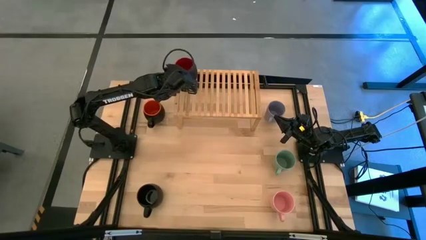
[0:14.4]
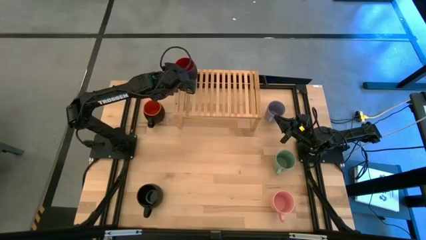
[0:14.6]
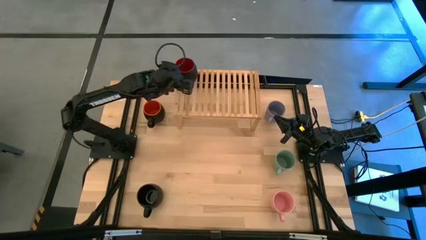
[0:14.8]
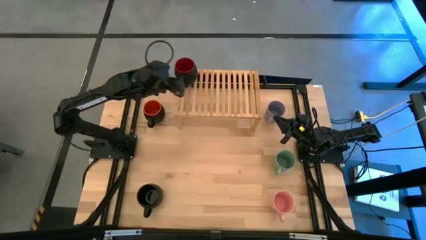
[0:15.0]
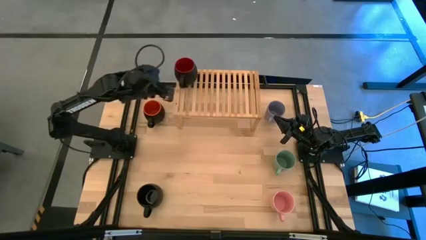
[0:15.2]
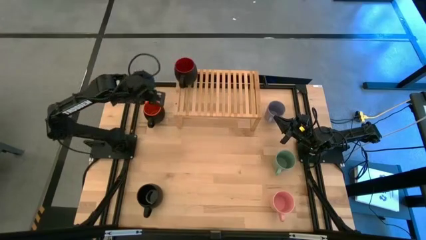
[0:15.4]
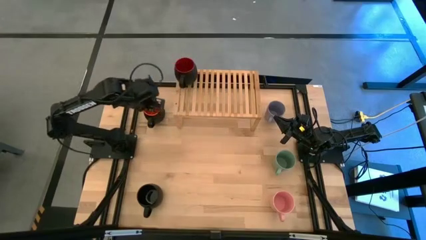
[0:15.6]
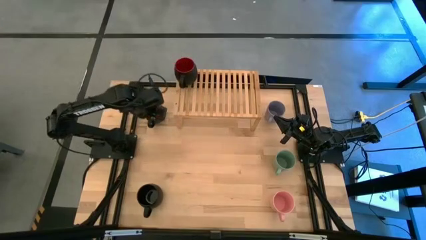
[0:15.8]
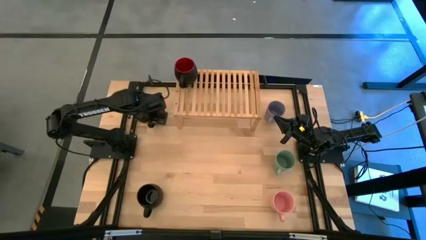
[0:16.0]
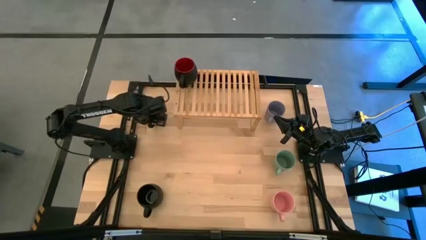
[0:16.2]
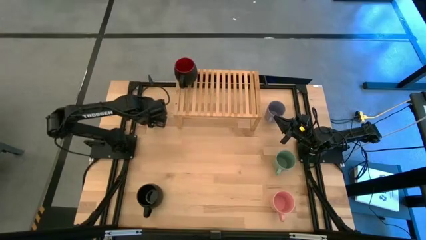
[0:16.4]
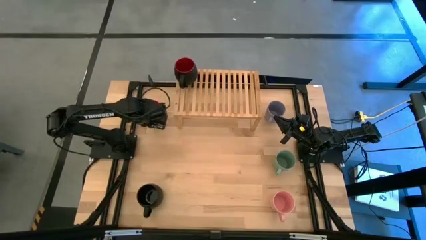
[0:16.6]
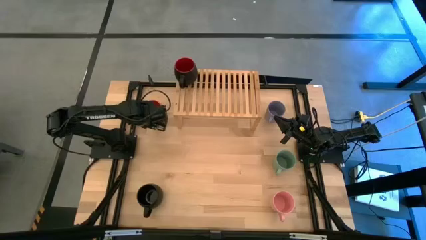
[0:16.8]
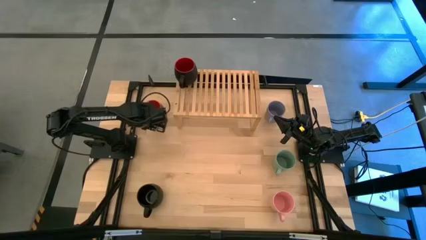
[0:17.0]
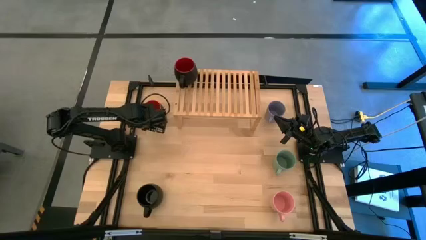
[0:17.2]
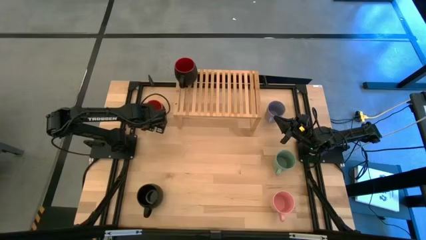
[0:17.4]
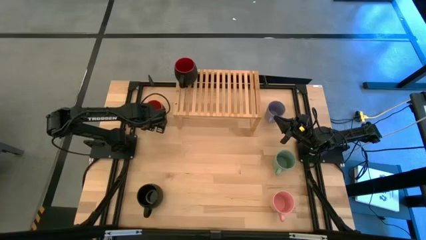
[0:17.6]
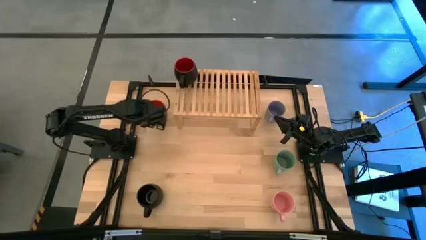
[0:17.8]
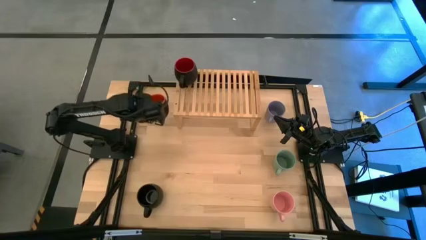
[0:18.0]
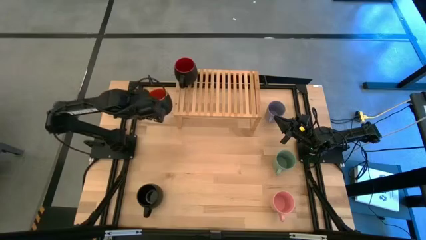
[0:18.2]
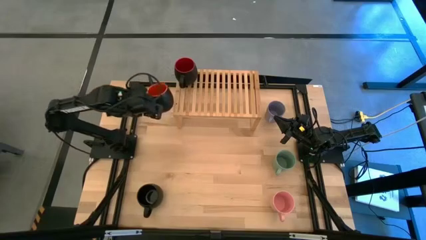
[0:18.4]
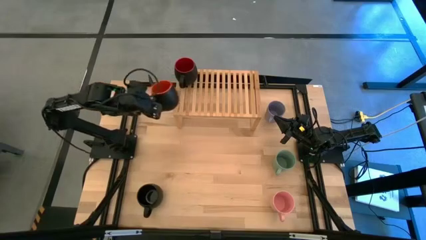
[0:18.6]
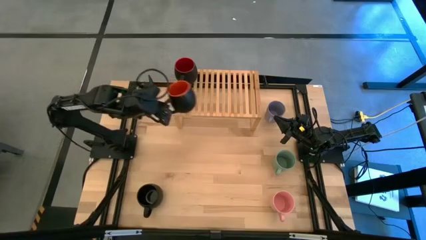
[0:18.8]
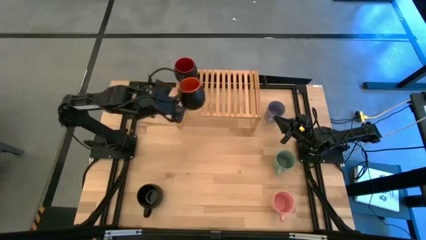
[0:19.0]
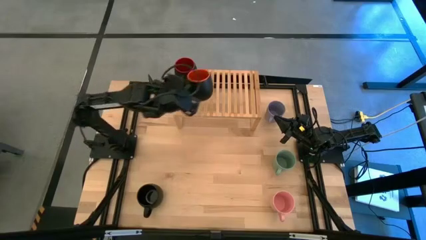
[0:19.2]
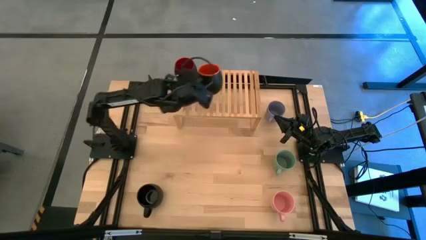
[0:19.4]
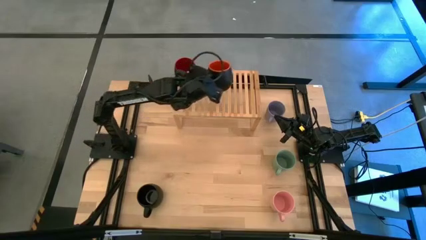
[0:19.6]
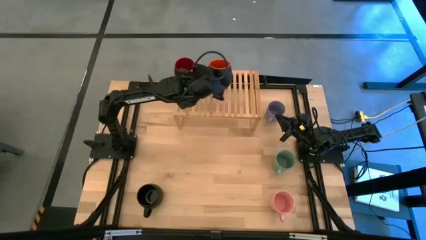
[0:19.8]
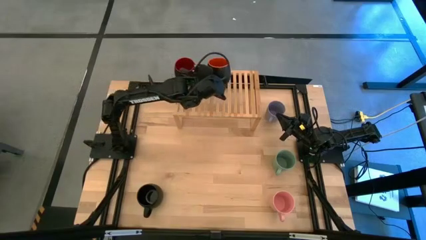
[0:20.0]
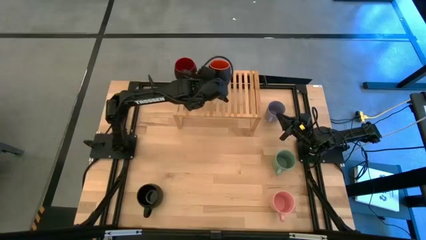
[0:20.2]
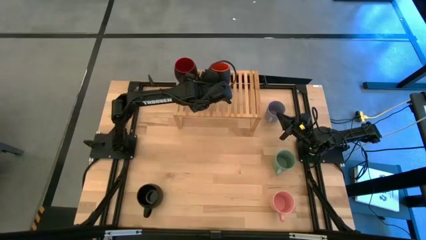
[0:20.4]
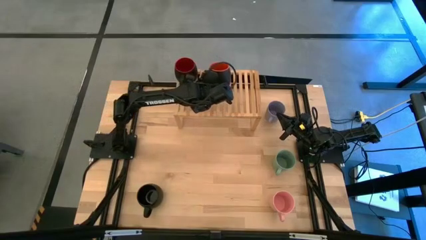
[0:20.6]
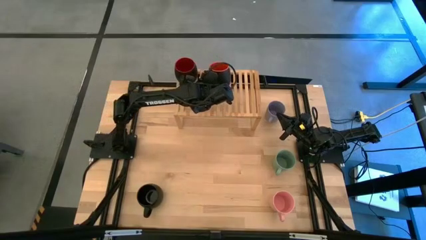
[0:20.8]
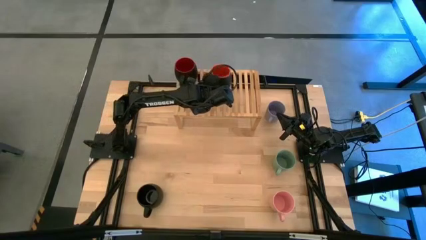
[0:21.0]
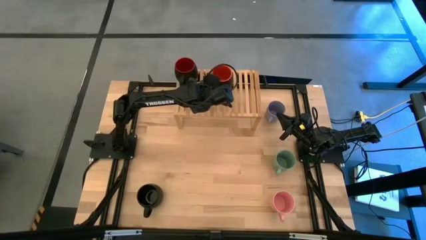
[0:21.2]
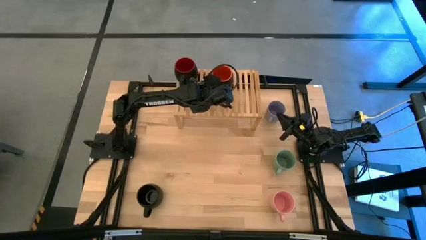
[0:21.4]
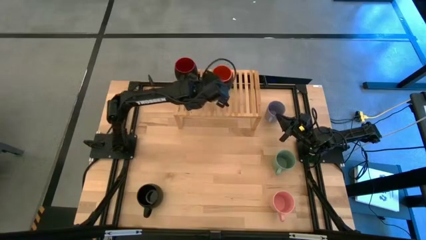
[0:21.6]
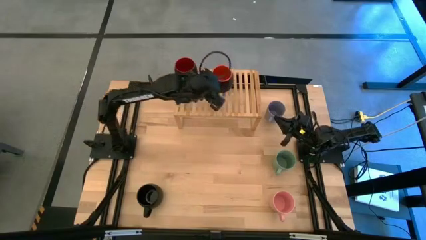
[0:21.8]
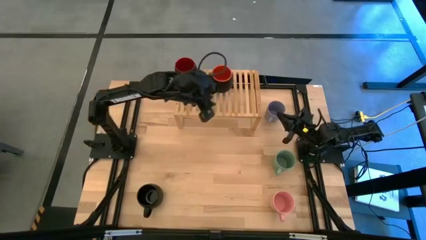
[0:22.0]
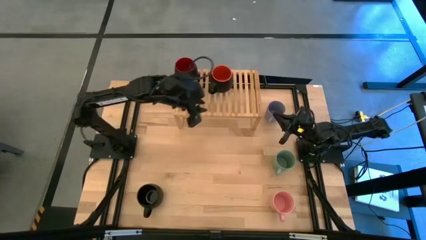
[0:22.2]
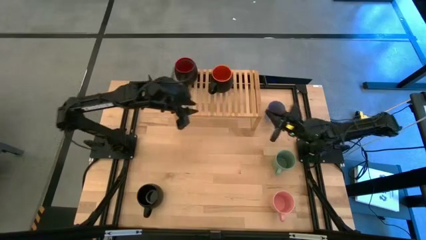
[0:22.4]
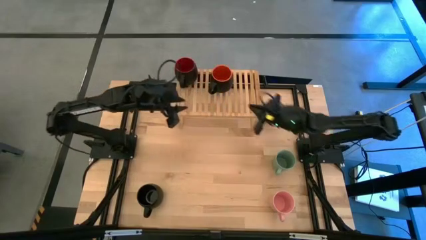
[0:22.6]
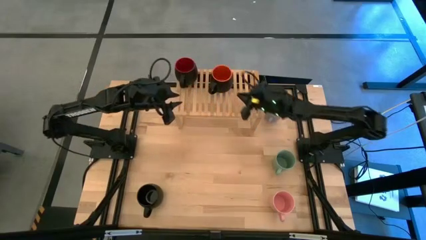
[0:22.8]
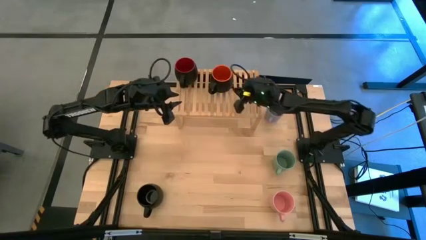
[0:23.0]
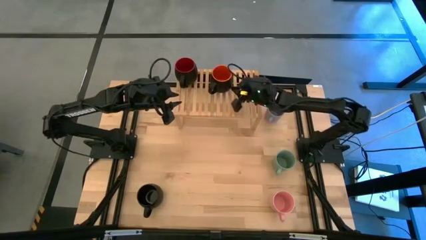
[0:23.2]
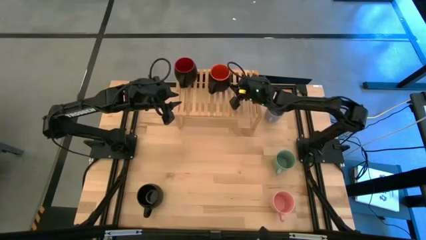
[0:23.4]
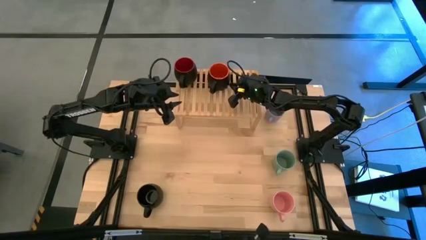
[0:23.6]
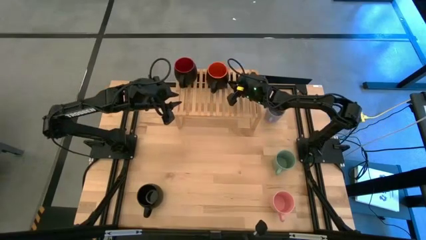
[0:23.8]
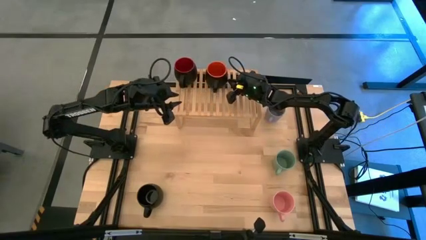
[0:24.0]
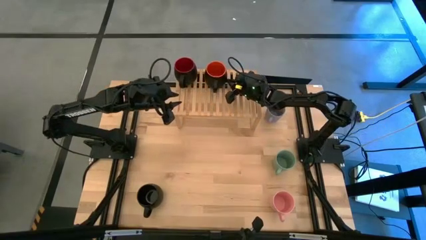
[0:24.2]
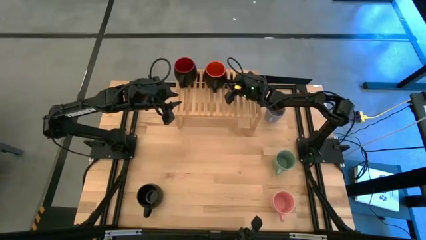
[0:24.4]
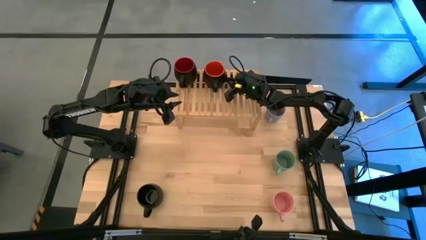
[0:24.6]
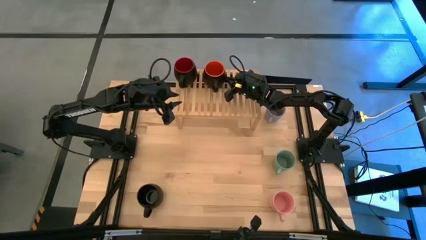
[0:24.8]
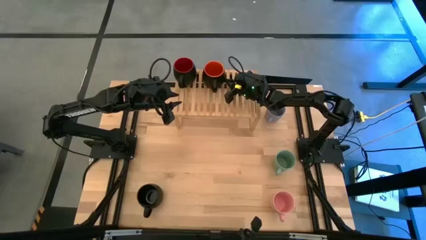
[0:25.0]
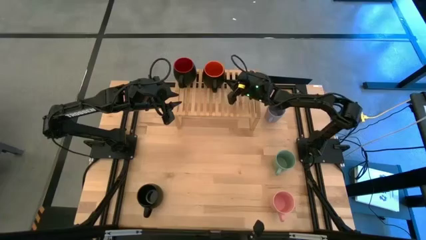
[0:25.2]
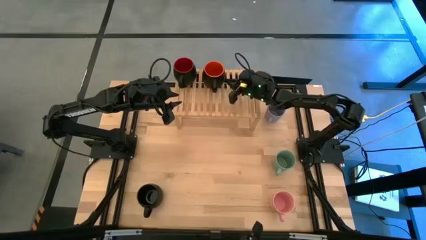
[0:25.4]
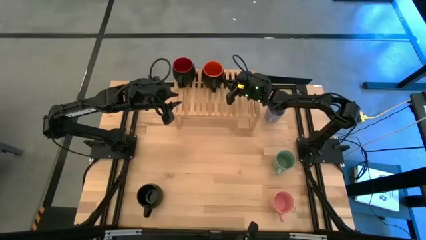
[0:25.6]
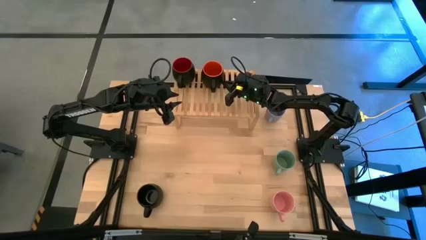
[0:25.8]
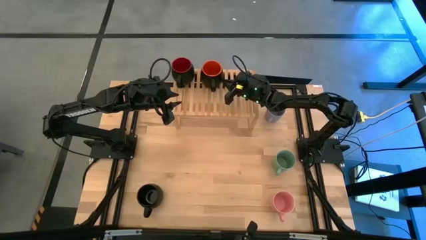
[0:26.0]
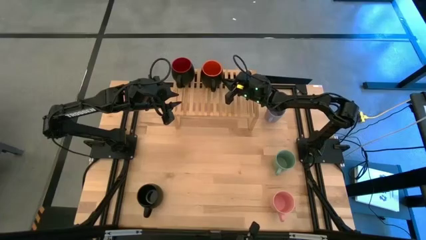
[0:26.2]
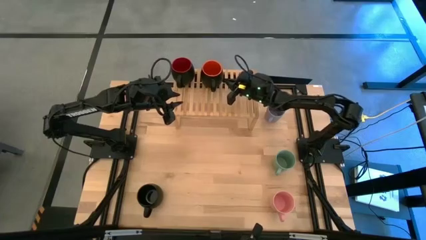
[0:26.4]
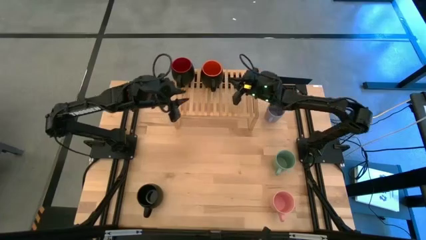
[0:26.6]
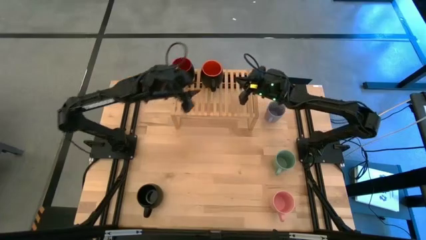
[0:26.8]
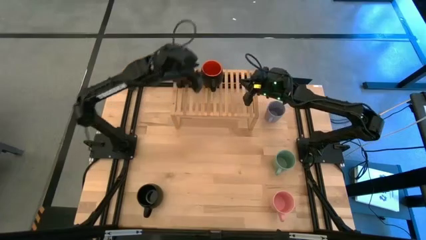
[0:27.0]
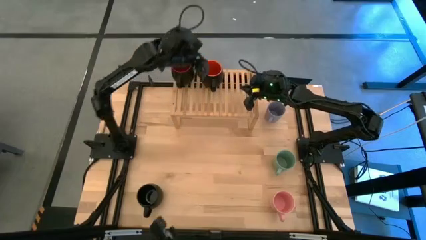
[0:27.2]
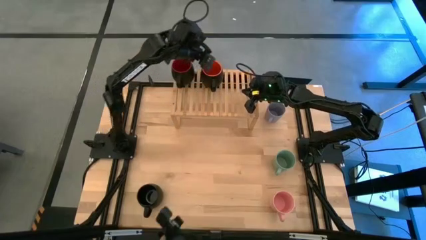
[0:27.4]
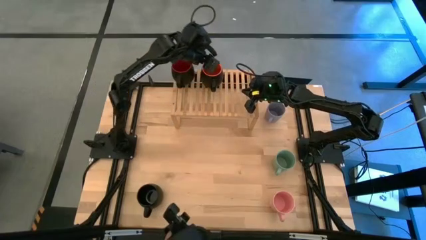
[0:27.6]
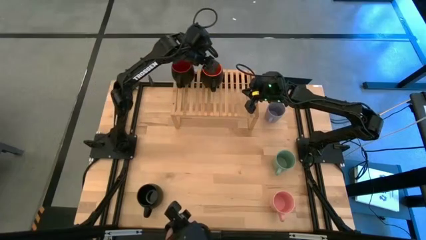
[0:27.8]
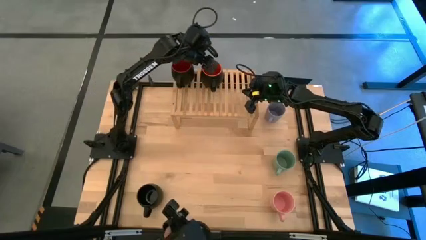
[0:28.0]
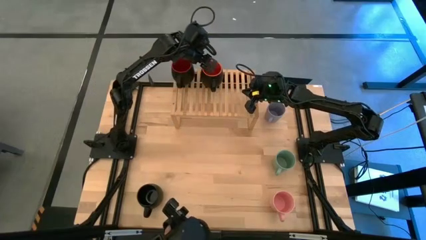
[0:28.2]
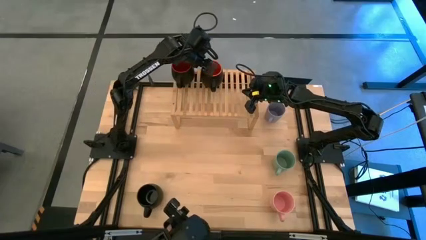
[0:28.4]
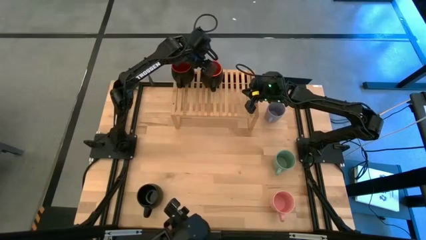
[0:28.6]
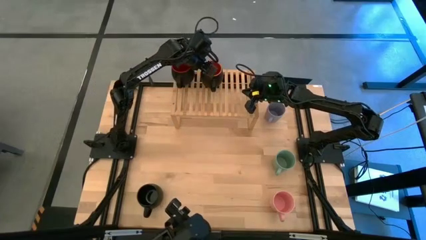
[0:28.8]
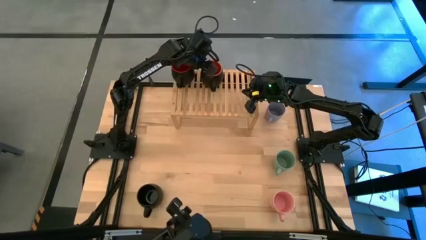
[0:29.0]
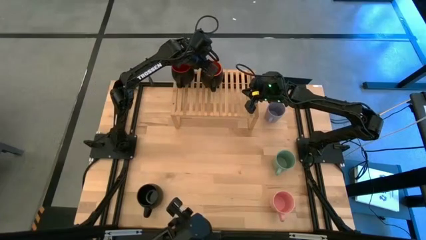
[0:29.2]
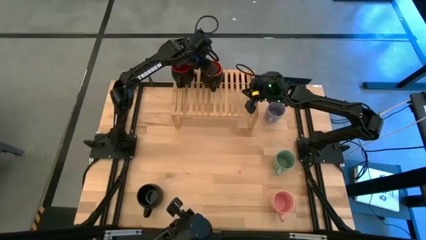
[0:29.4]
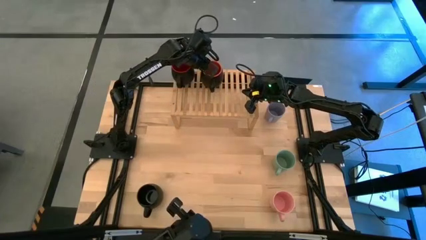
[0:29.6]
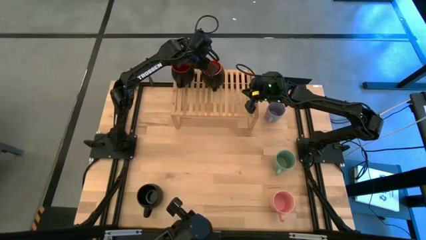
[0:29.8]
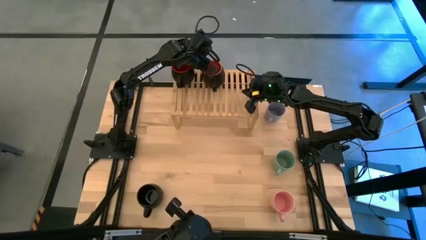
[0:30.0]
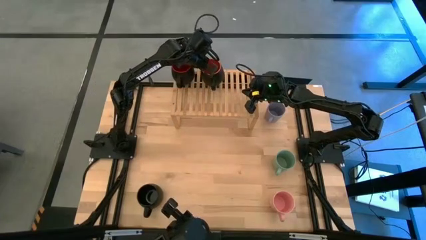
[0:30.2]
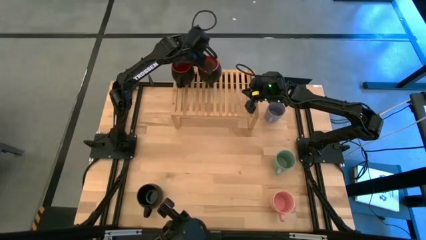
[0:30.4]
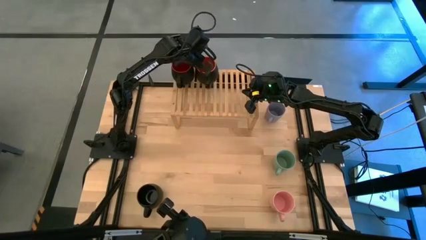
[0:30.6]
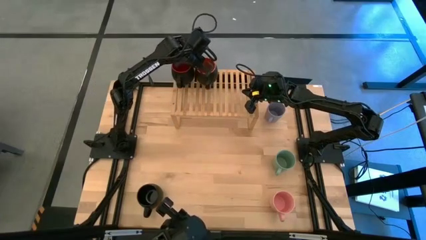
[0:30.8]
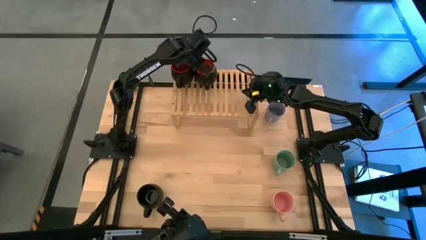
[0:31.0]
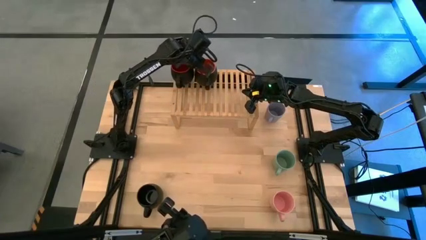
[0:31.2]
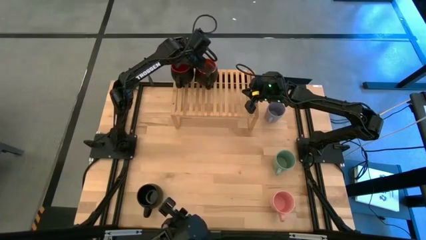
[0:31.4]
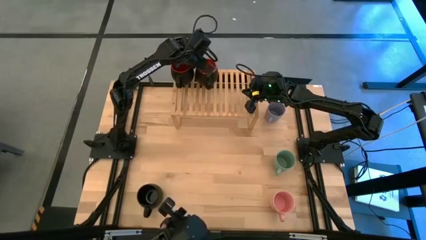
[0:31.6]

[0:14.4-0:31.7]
Task: Place coffee mugs
Put the black orange mug onto the shelf
